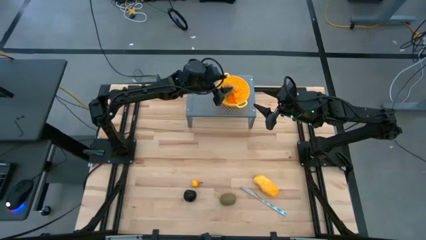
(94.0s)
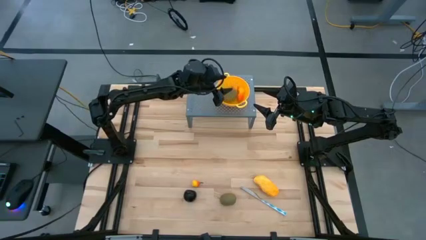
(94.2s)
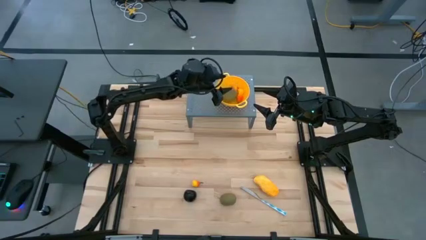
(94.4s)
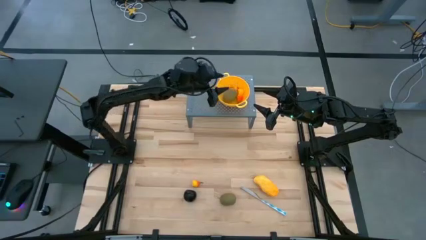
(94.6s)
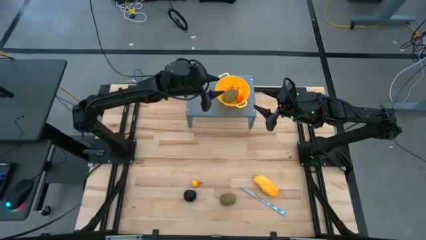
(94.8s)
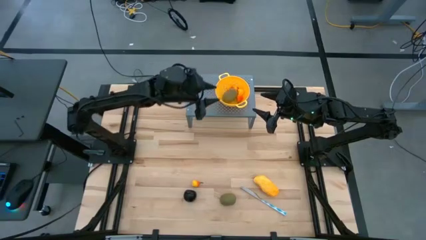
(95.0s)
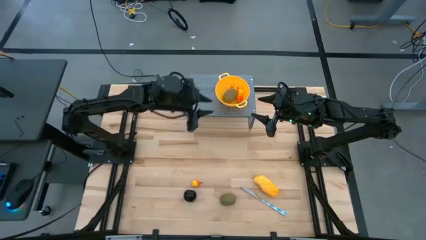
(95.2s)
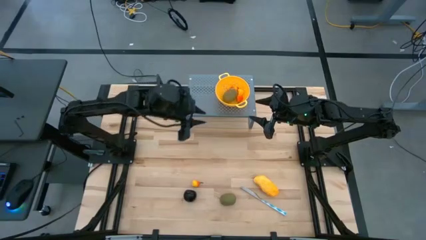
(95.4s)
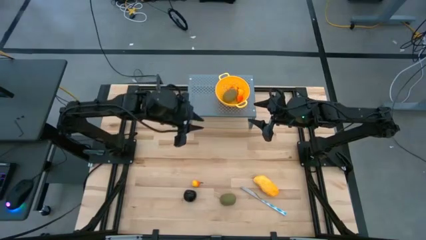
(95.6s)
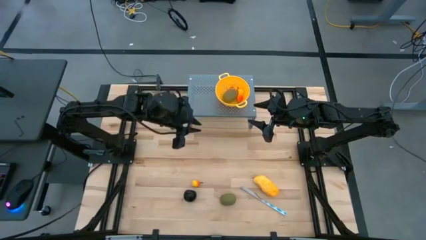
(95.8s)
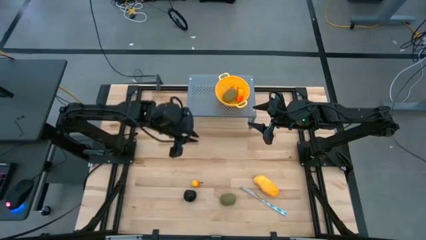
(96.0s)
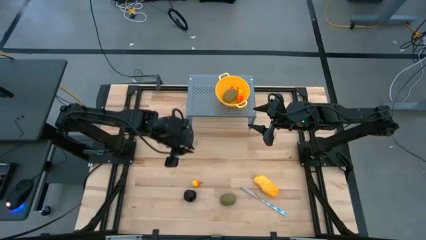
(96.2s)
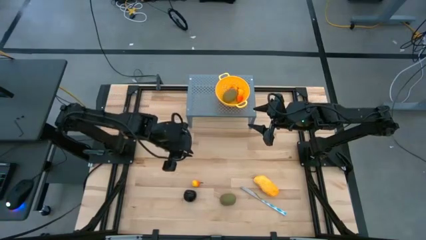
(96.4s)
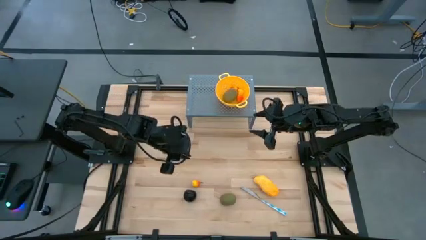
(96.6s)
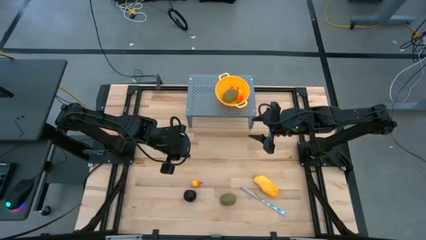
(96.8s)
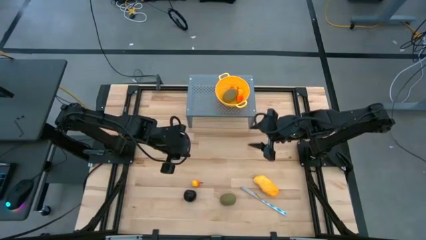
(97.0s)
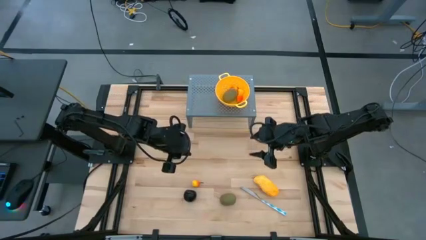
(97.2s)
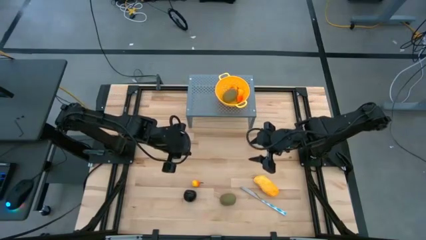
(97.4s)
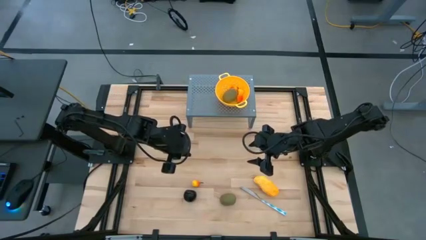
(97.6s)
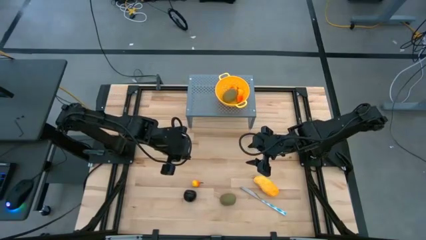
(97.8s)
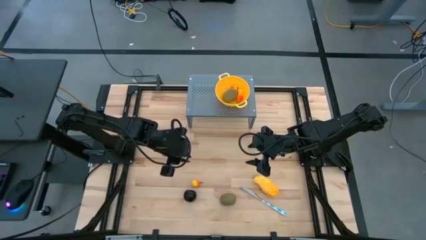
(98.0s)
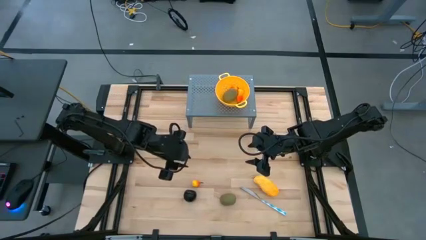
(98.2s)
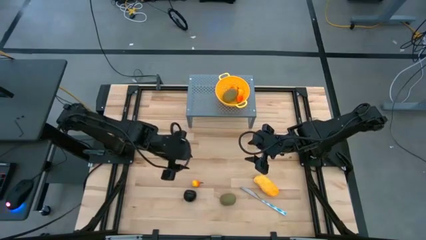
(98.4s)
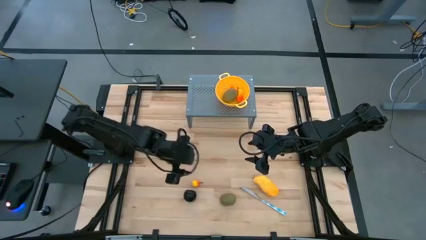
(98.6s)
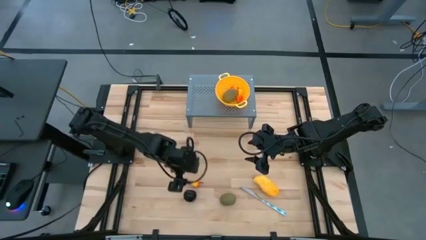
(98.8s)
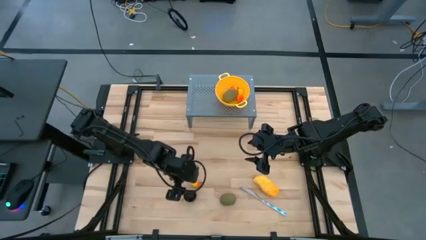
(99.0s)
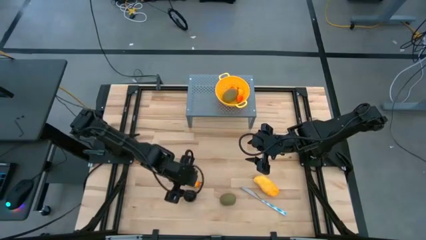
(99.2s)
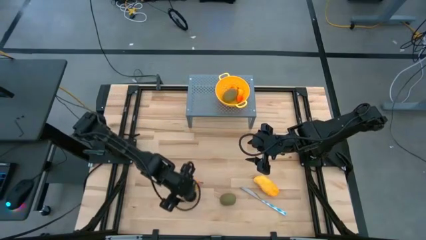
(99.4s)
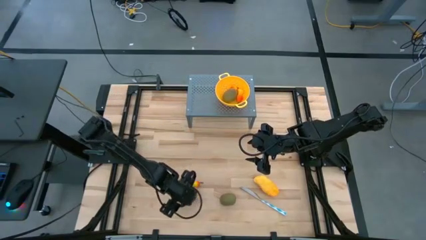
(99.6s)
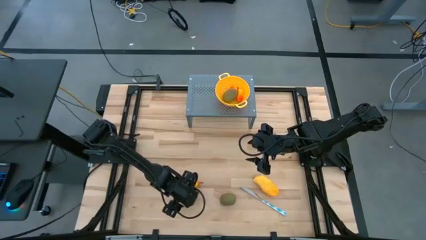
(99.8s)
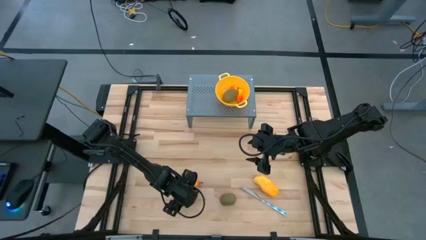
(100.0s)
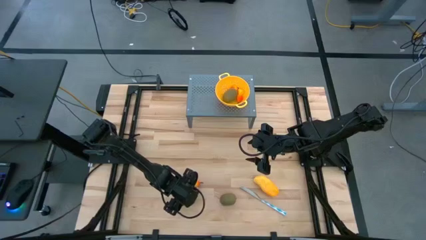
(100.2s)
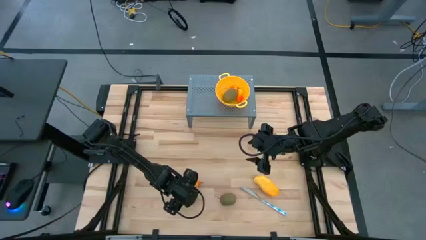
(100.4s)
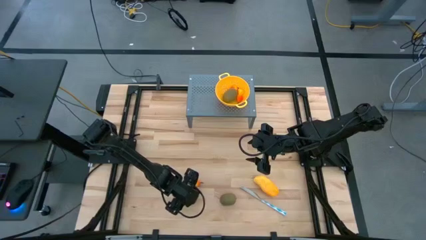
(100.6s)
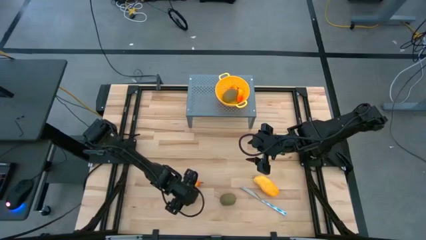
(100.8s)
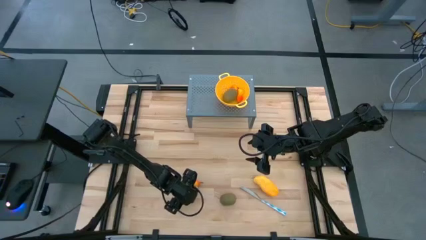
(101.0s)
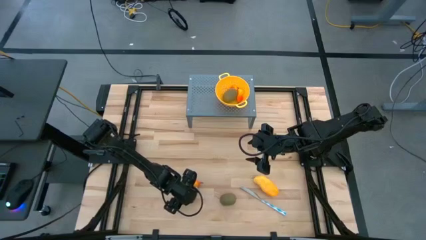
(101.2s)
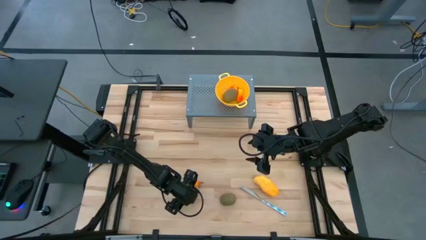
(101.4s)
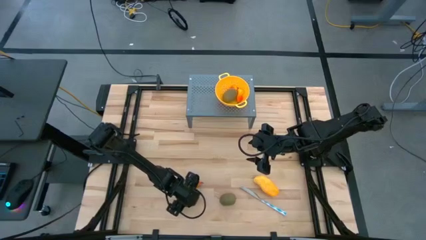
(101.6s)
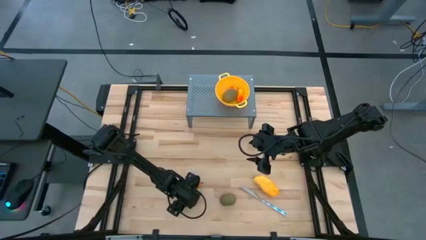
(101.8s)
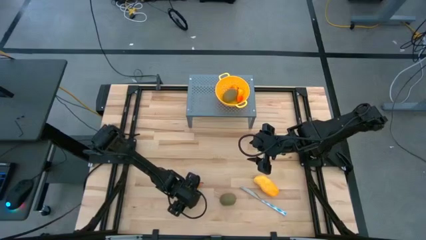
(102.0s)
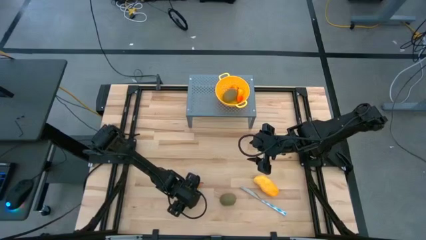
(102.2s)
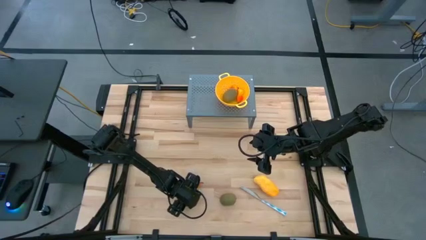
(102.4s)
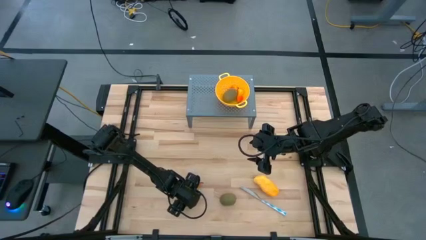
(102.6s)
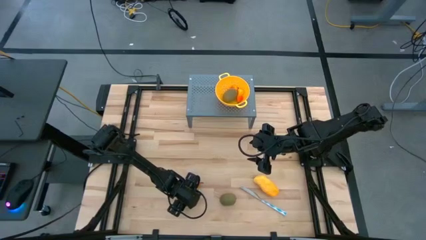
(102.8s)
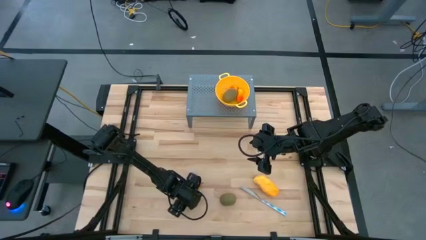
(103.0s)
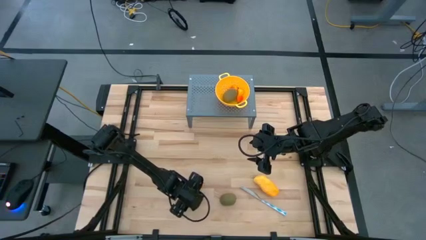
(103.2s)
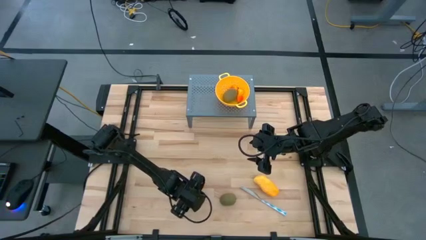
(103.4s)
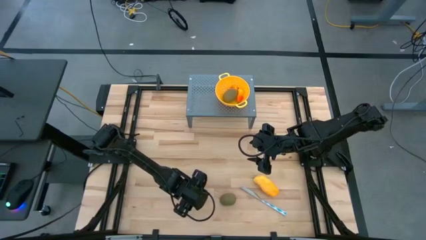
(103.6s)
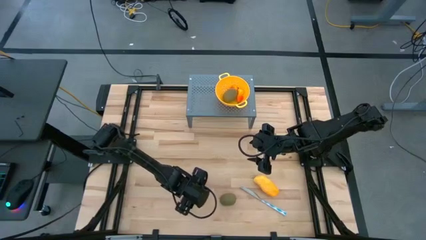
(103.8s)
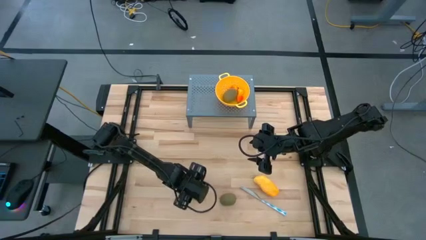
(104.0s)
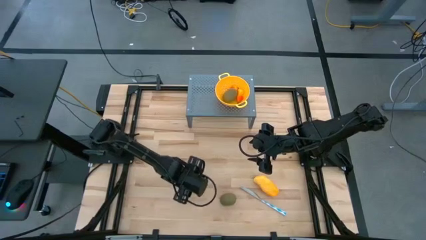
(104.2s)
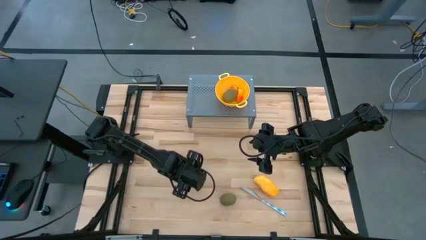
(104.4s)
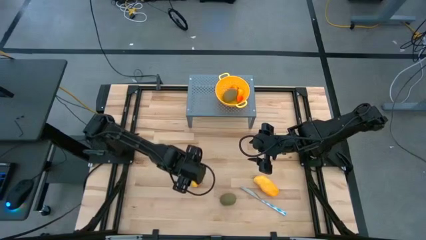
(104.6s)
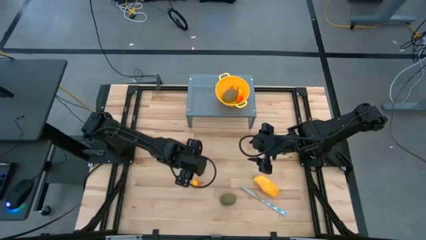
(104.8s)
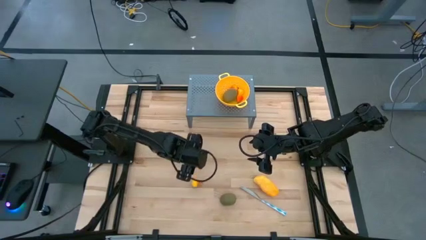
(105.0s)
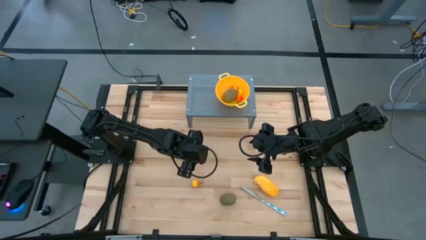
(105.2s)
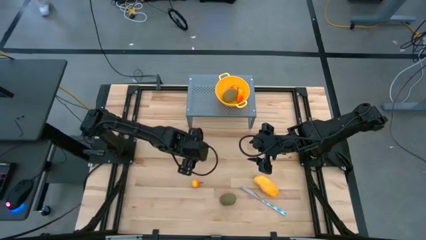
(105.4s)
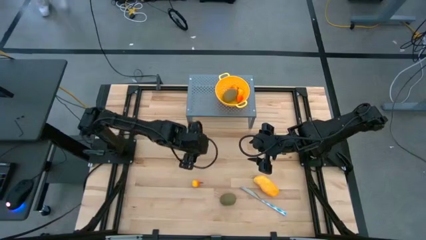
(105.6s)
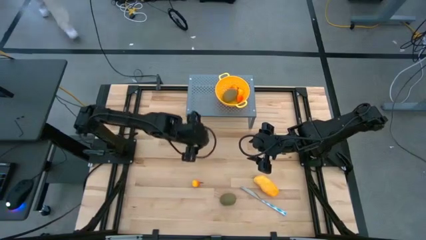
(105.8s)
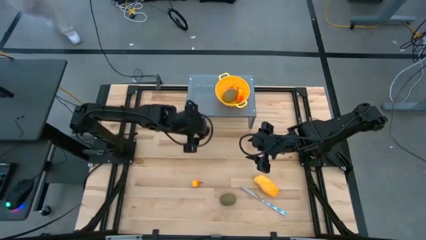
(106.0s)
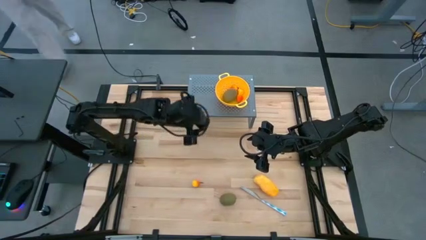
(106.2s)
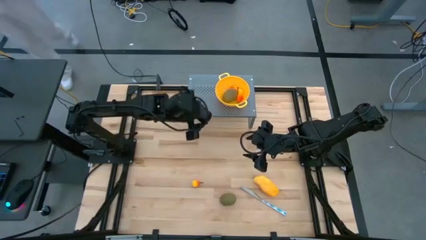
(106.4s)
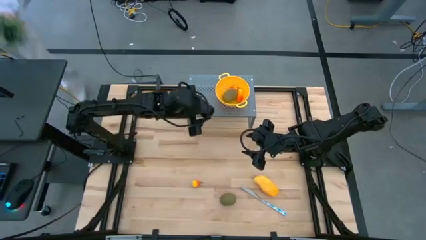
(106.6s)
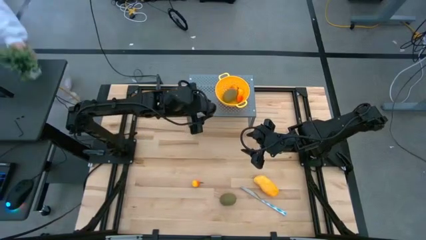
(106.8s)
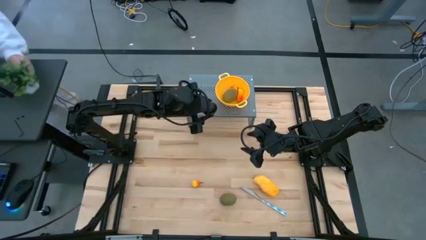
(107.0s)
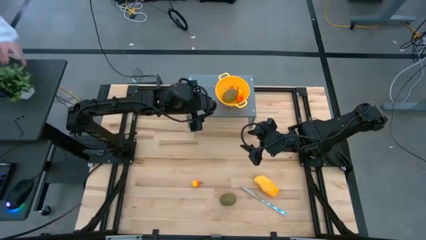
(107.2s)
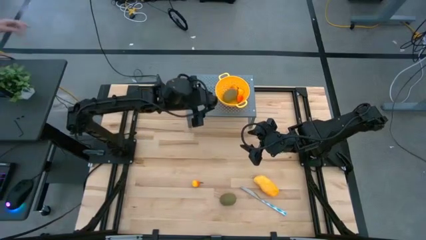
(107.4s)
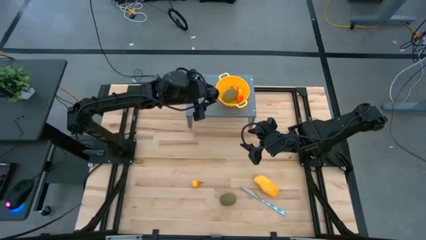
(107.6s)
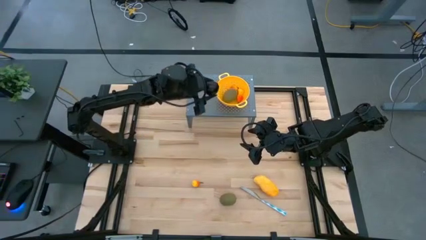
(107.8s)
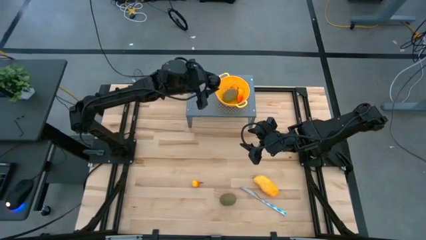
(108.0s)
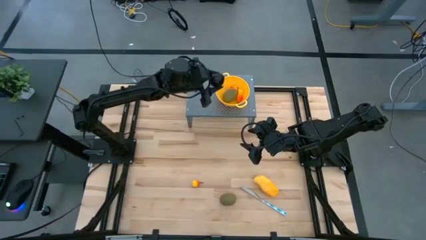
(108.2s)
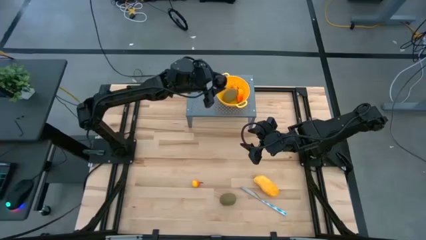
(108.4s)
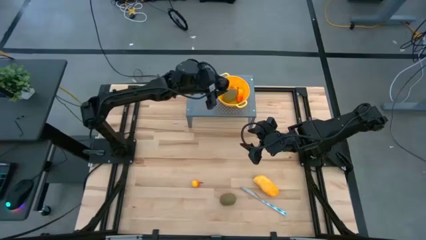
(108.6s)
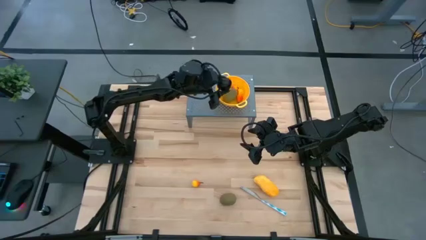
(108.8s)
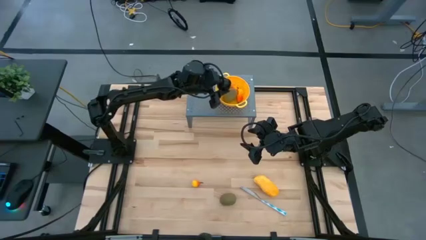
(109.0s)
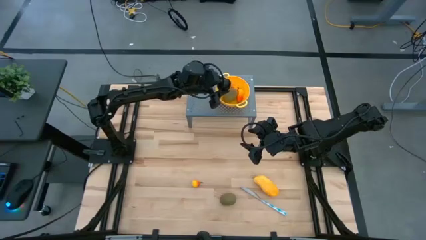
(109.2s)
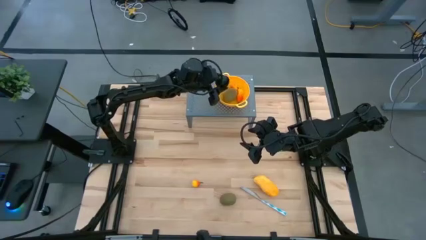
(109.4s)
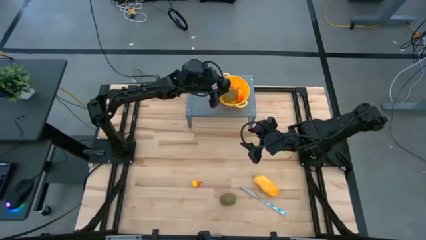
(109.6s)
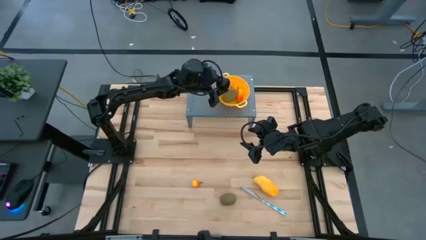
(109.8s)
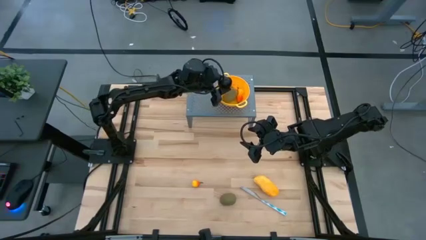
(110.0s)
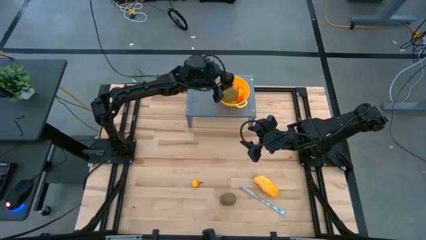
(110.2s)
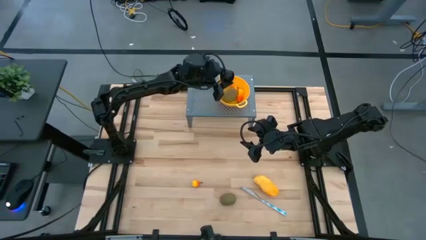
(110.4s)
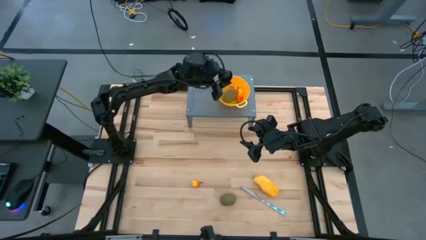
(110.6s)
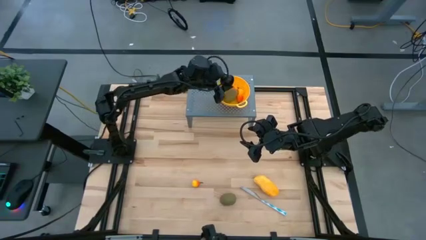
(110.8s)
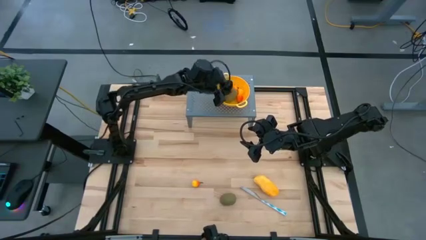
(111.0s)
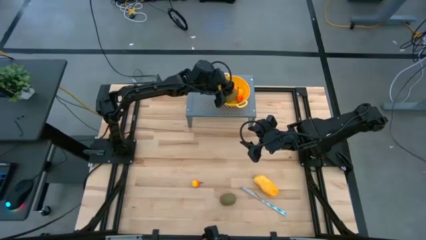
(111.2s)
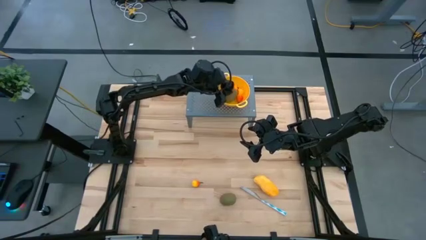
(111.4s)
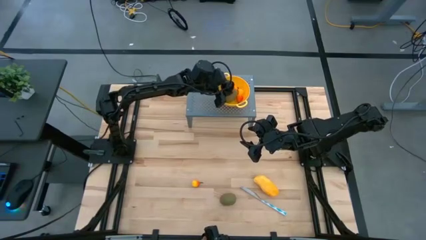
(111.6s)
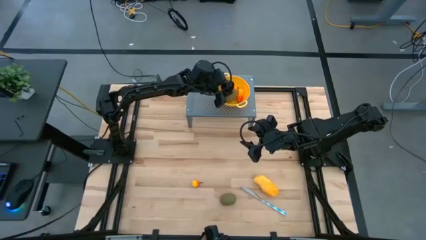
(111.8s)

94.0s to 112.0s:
Task: Pick & Place Fruit
Put the plum into the yellow strainer bowl on the shelf
